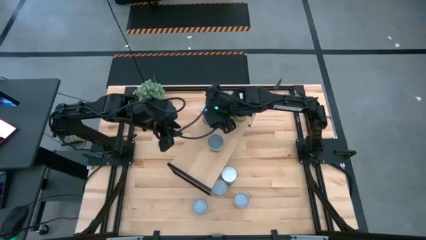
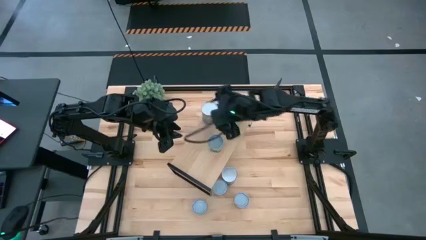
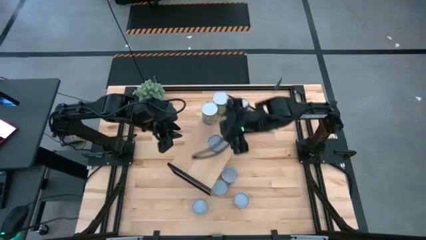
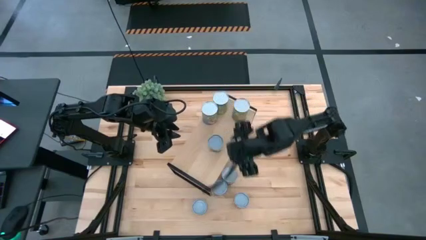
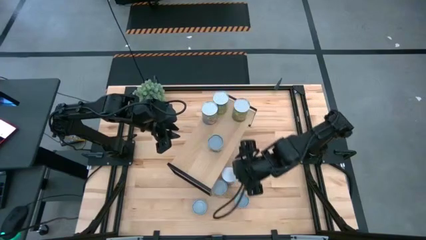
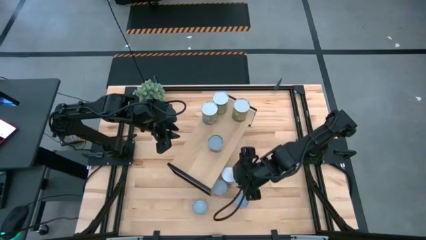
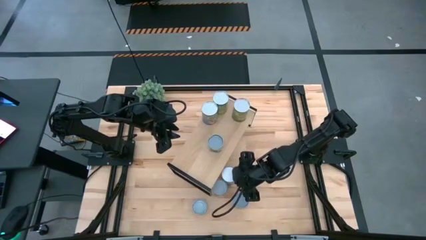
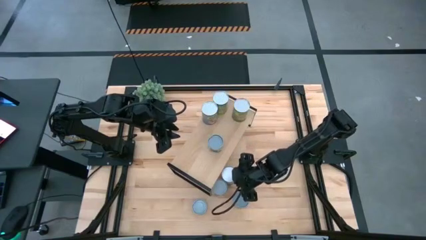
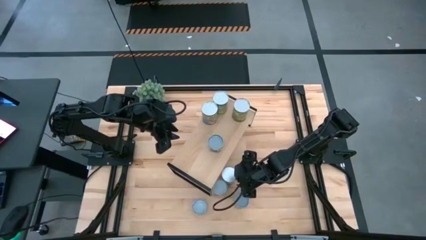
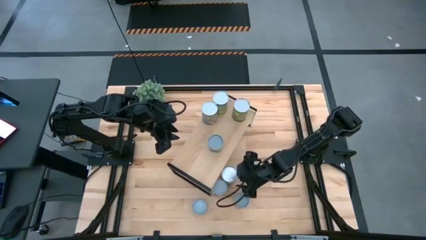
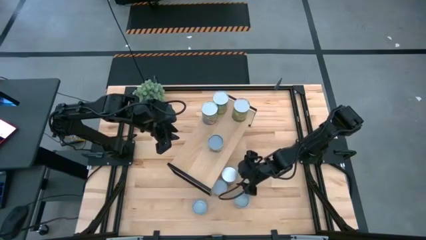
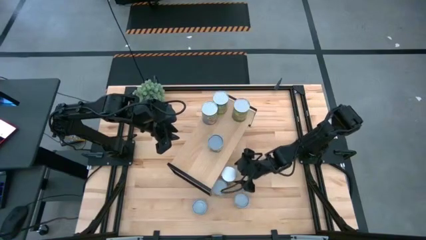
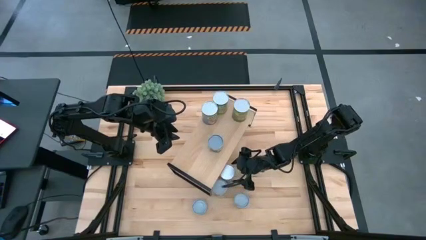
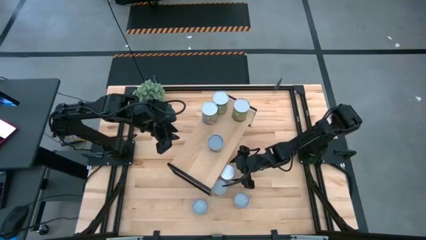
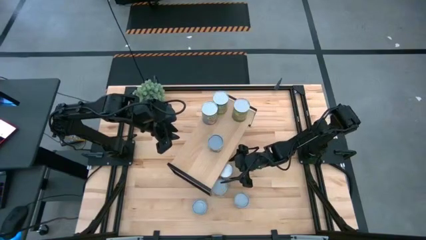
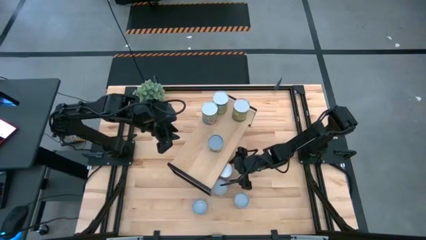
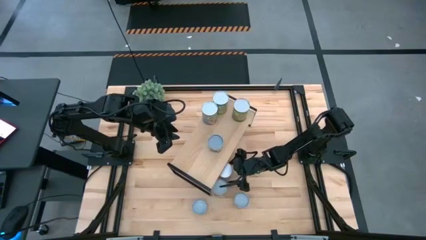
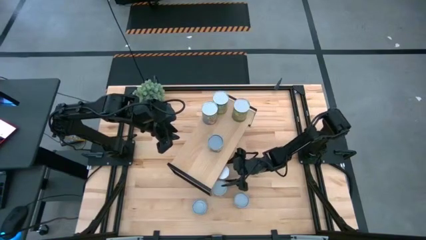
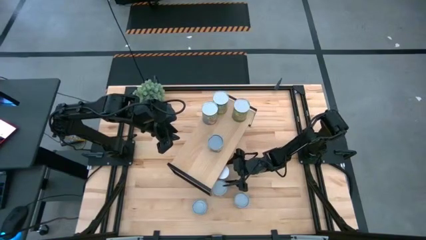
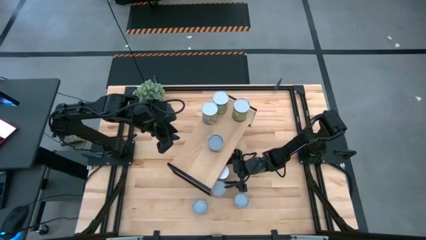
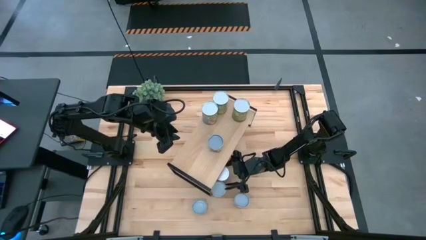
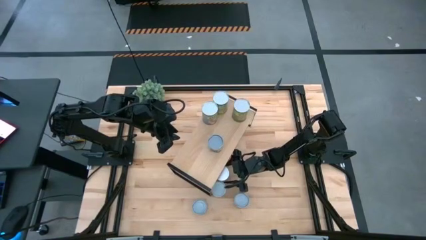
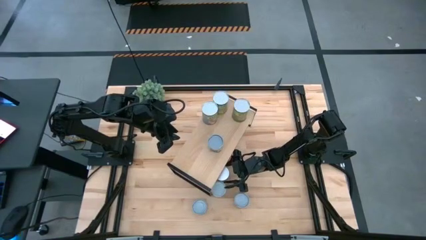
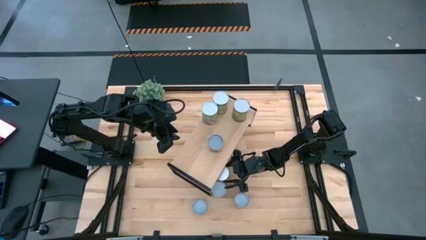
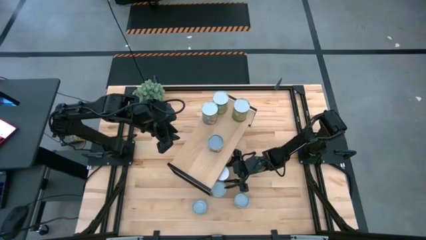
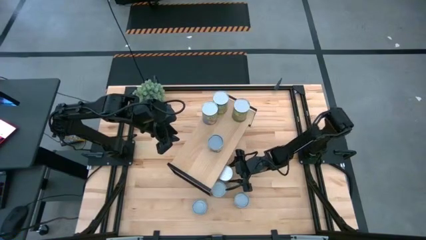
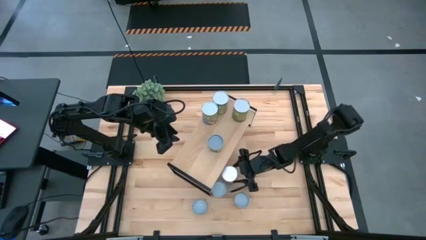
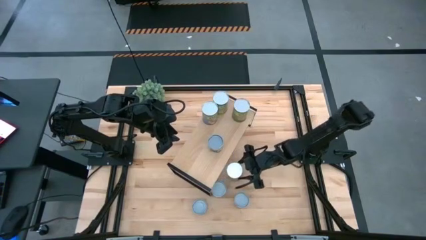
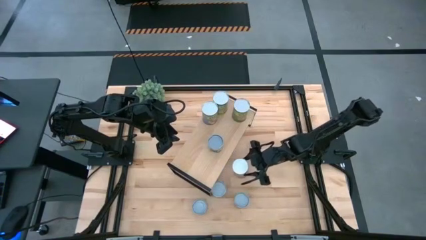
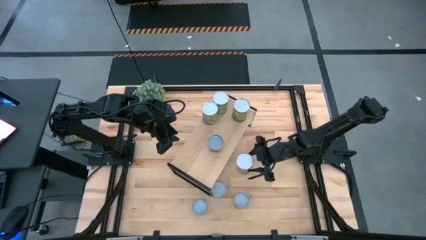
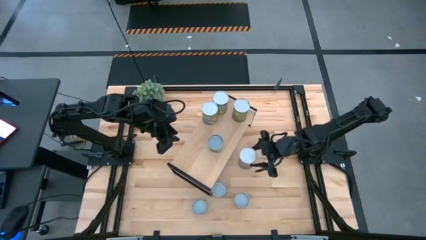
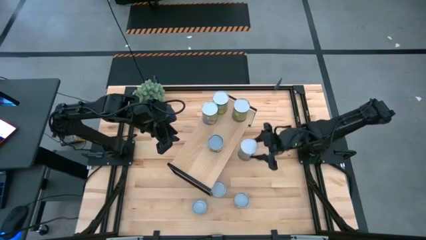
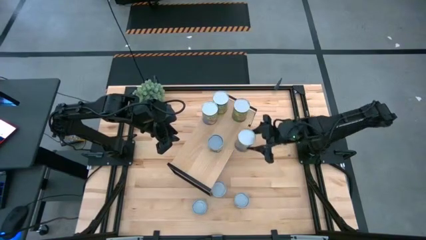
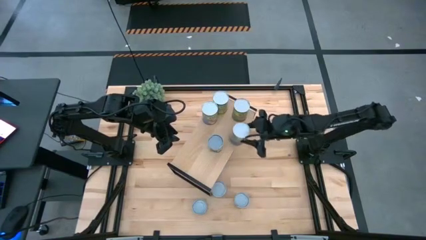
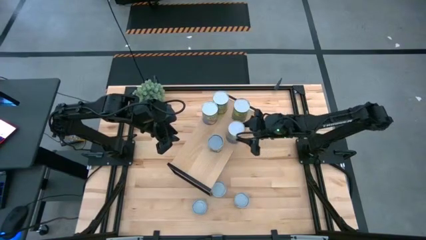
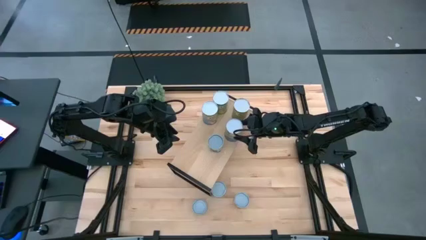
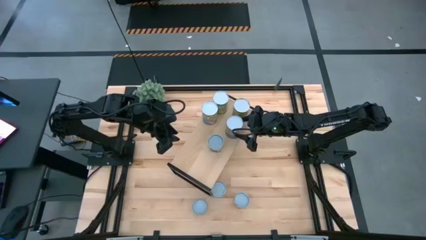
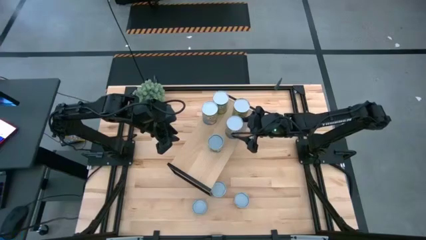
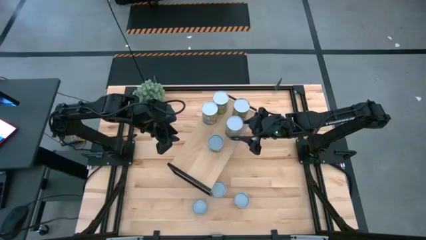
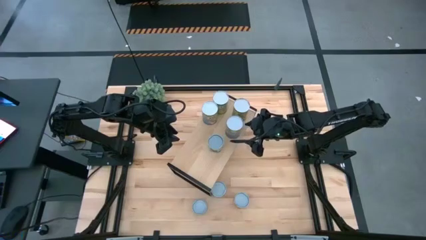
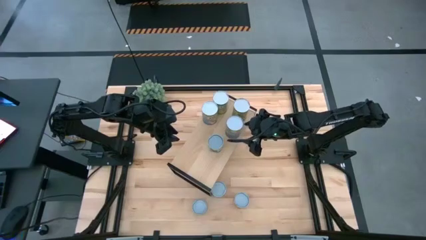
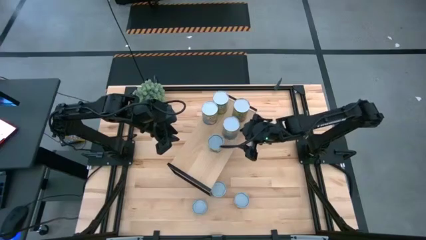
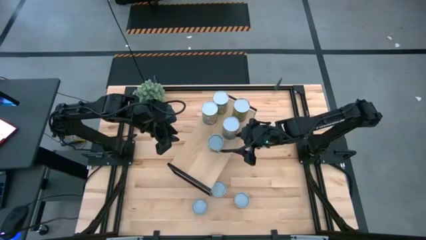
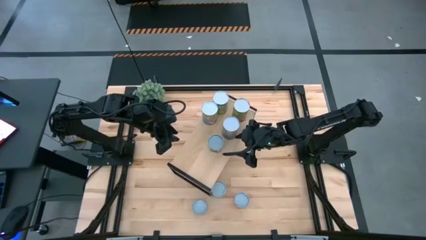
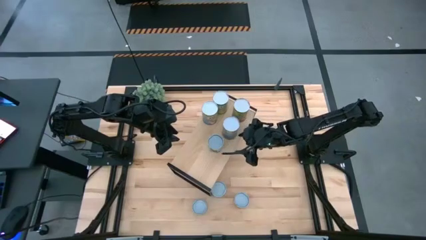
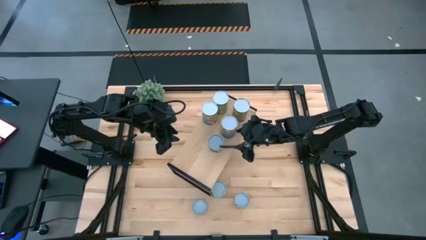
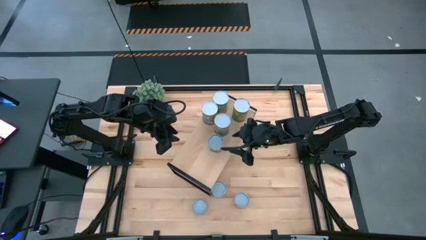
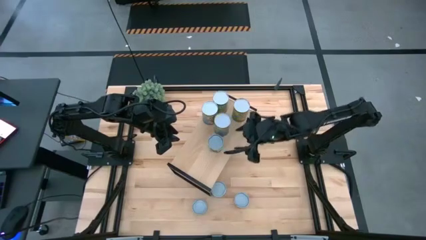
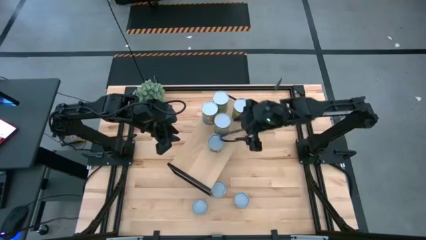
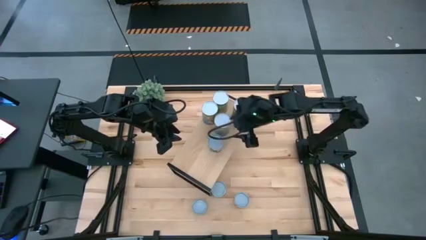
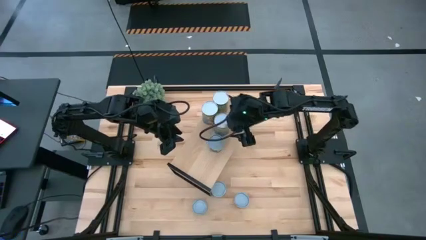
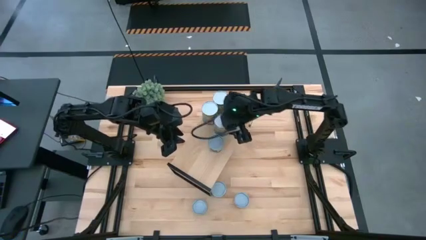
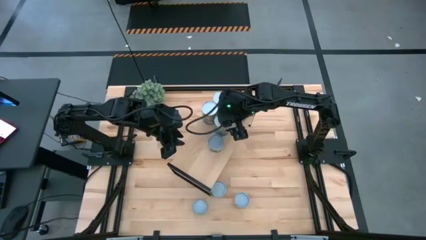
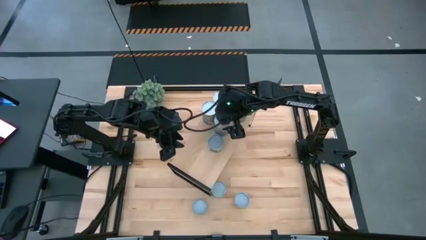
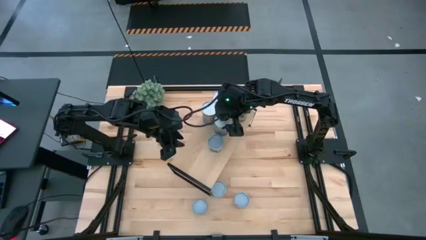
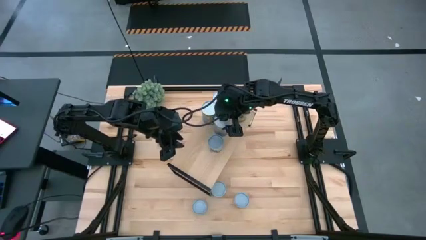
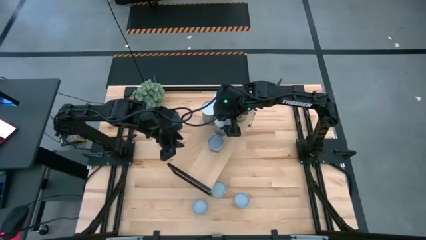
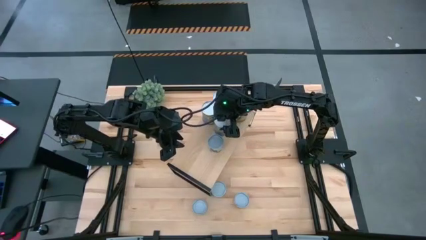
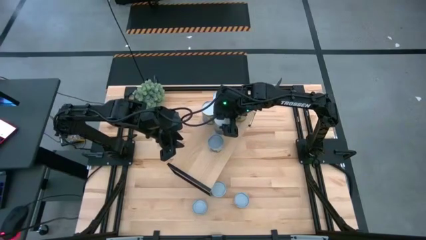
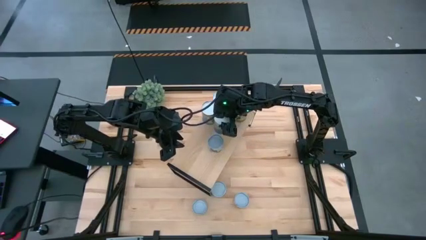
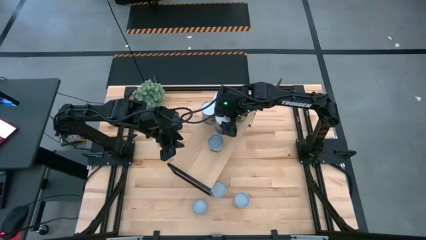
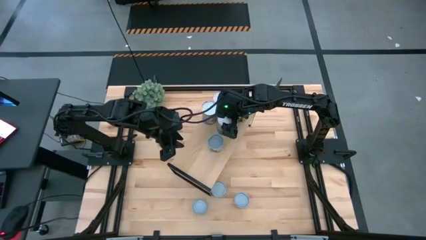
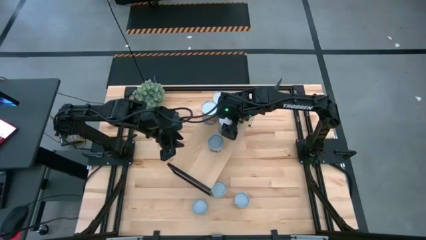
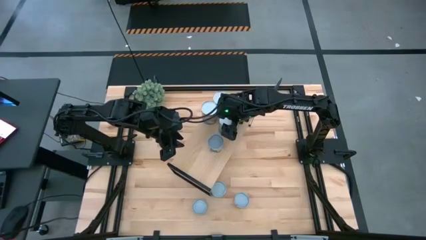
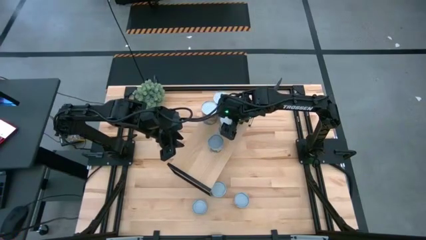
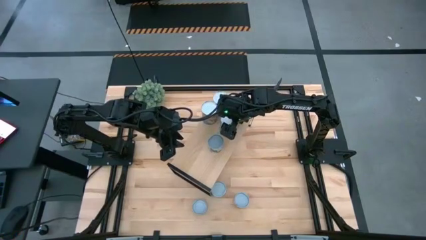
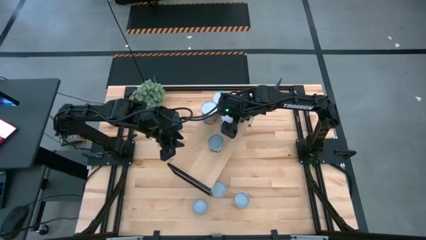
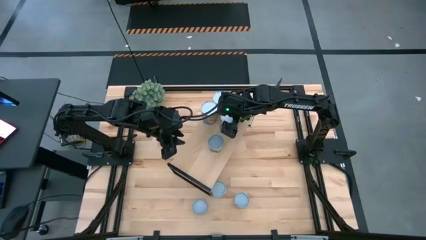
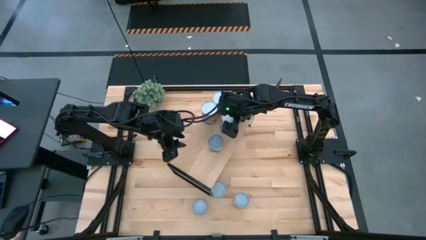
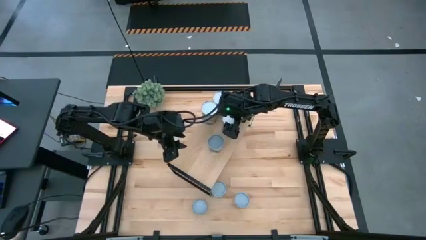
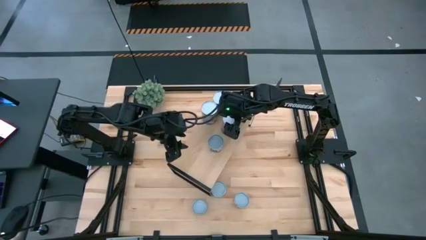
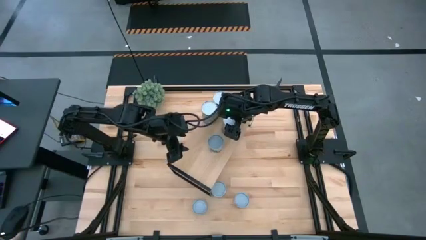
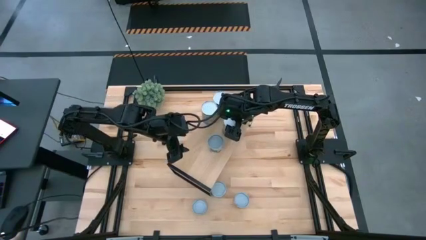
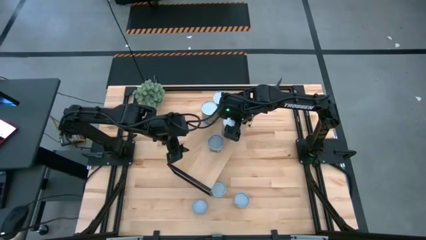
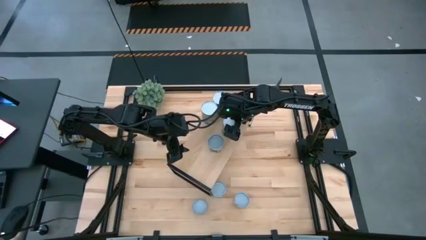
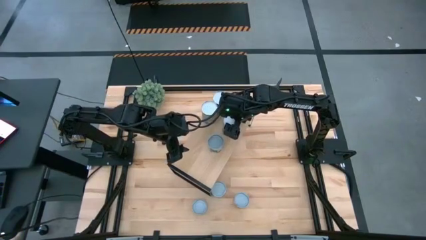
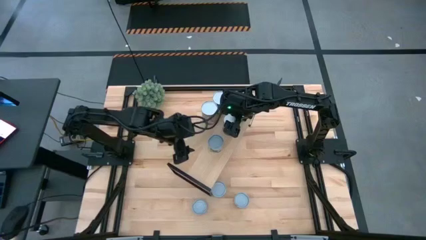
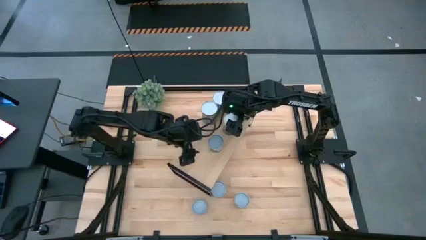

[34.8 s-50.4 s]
Task: Pick and place cans onto a shelf
Put the canned peas on the shelf
